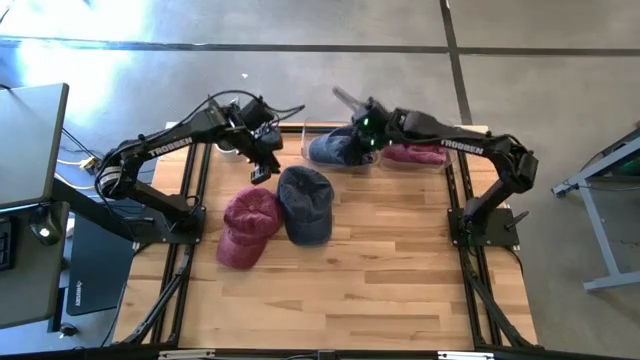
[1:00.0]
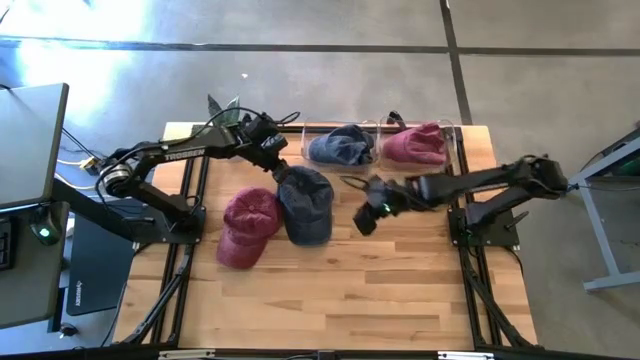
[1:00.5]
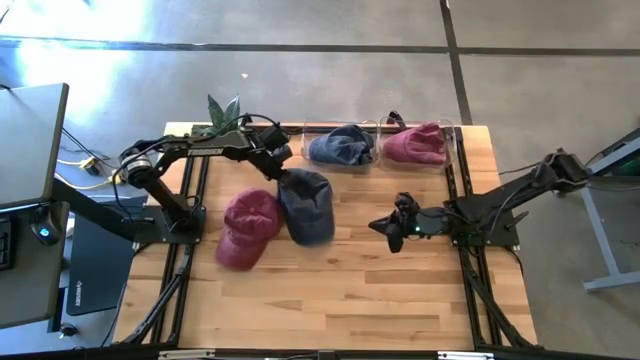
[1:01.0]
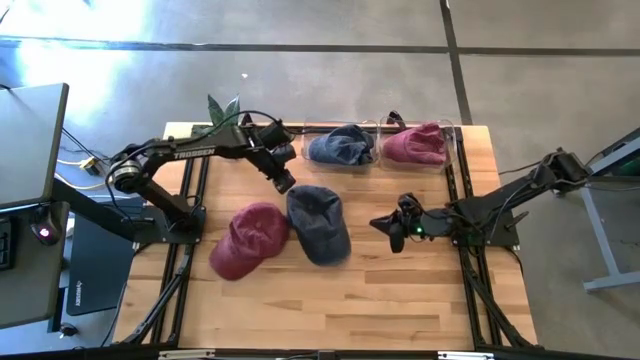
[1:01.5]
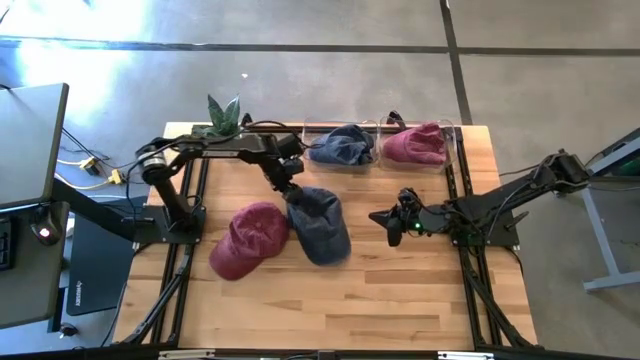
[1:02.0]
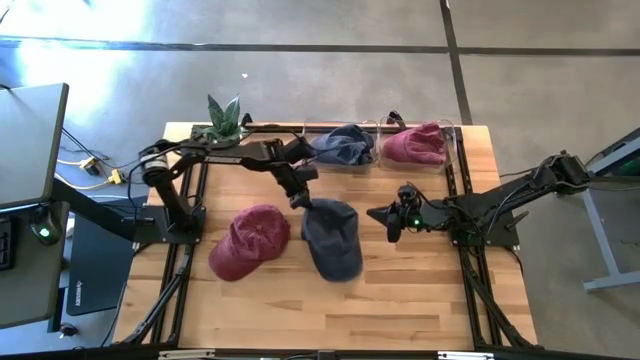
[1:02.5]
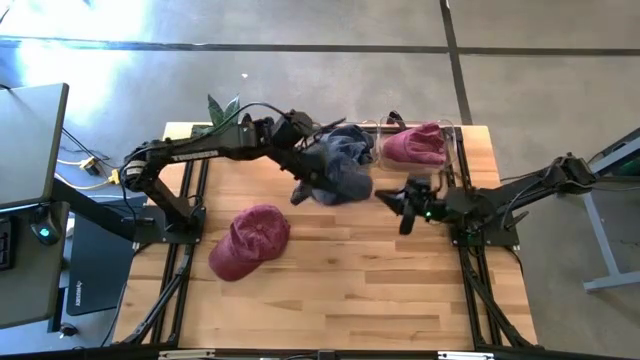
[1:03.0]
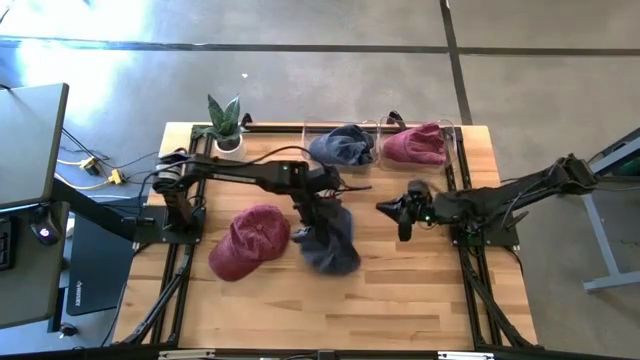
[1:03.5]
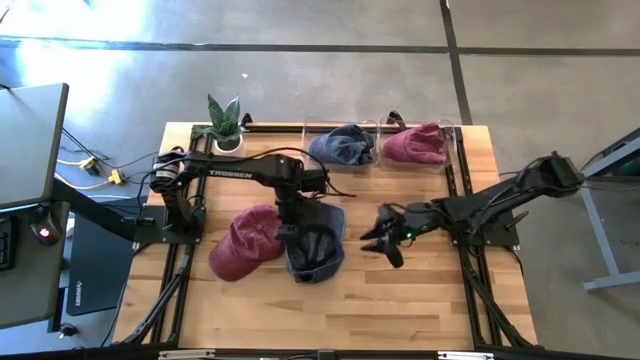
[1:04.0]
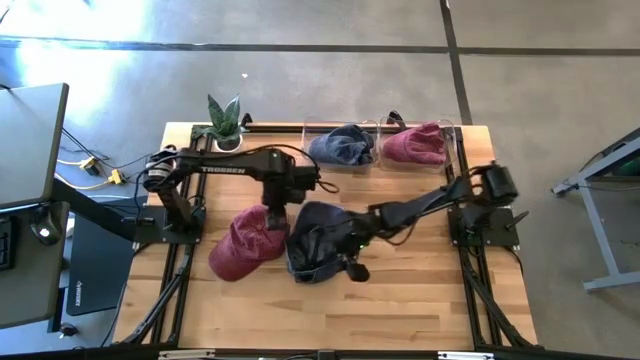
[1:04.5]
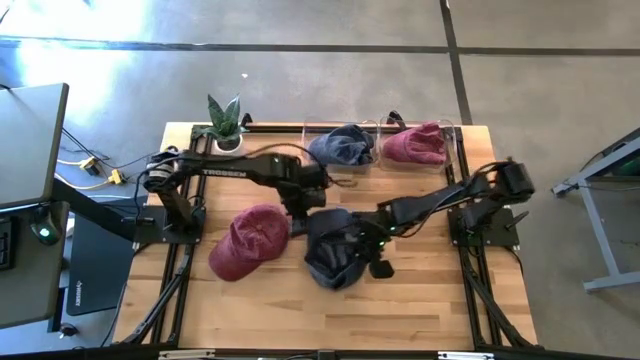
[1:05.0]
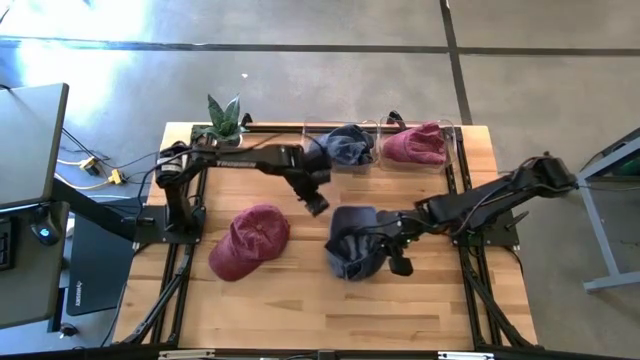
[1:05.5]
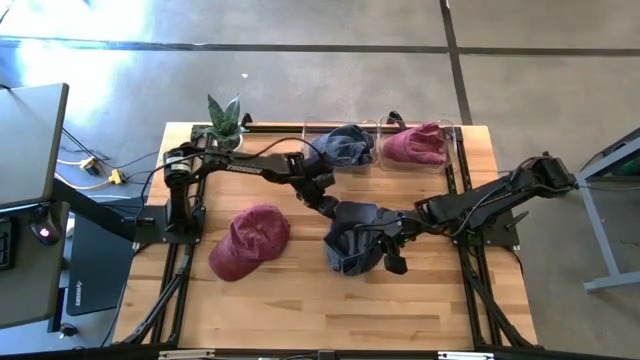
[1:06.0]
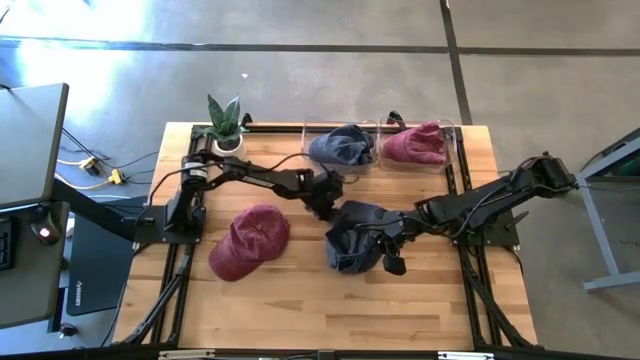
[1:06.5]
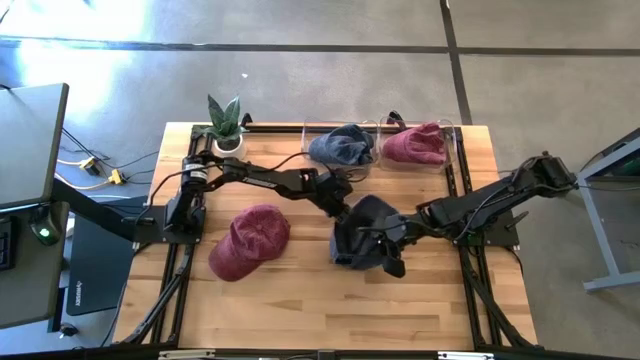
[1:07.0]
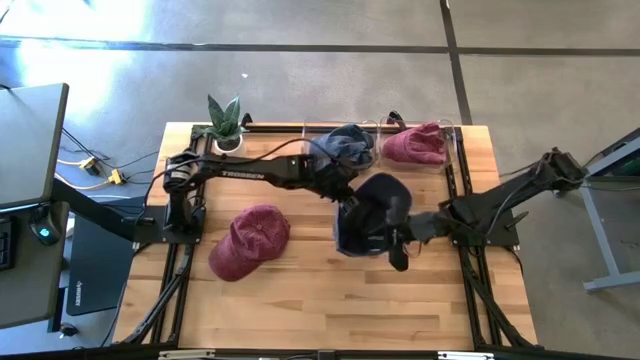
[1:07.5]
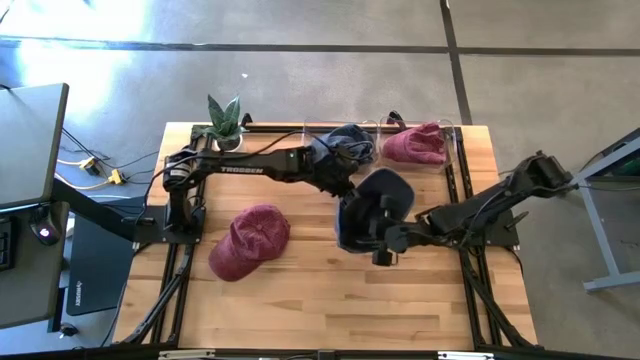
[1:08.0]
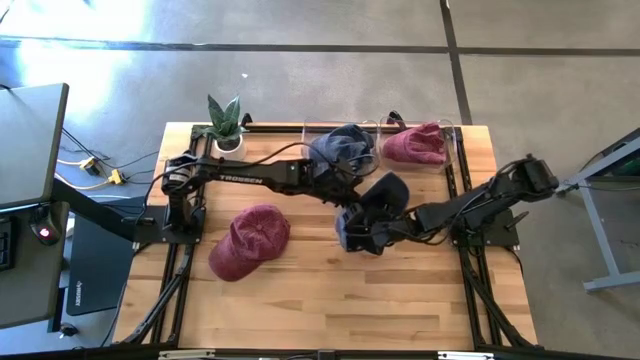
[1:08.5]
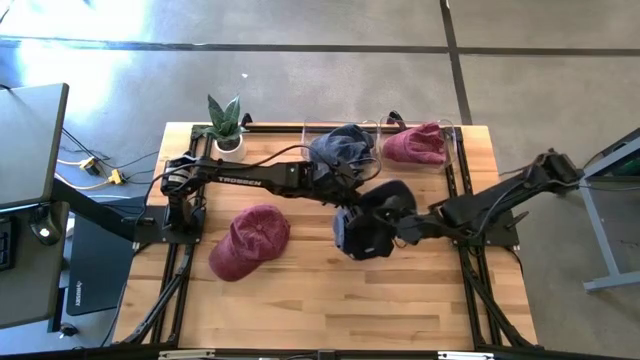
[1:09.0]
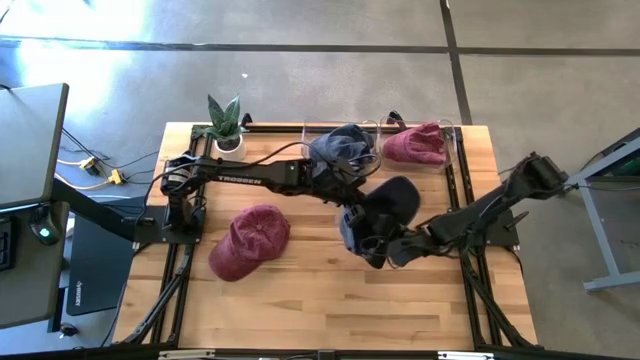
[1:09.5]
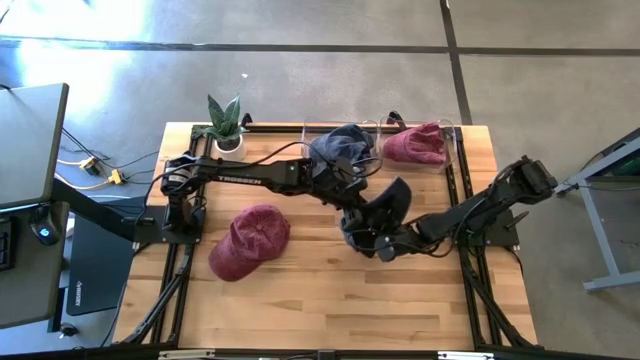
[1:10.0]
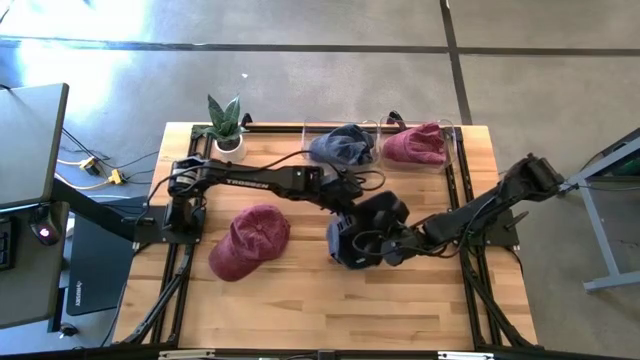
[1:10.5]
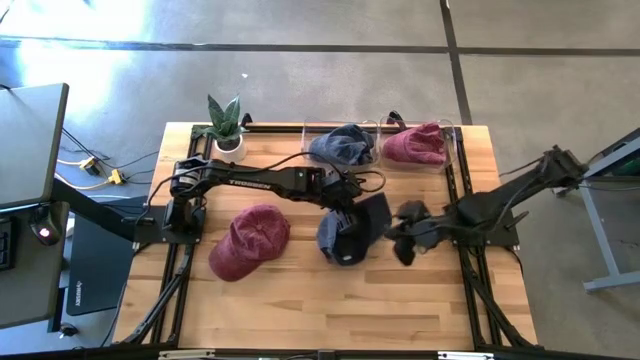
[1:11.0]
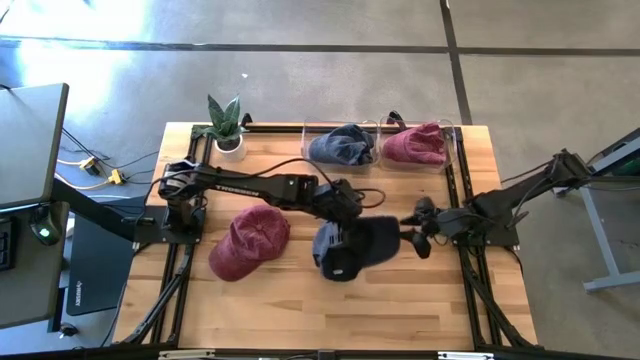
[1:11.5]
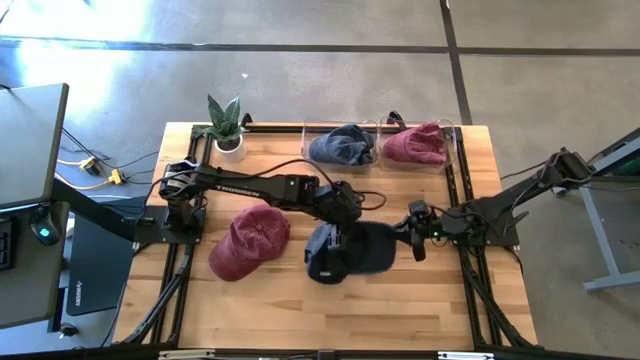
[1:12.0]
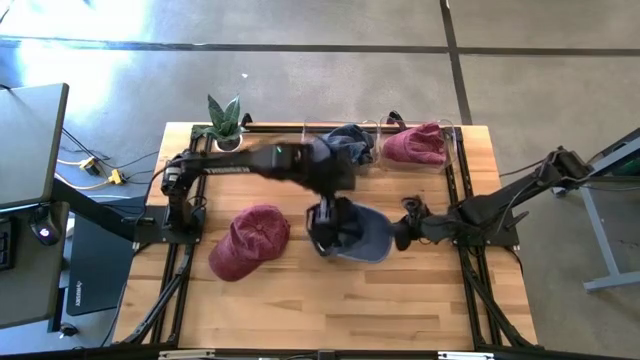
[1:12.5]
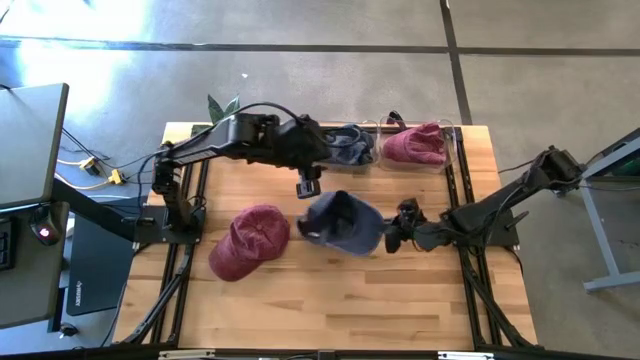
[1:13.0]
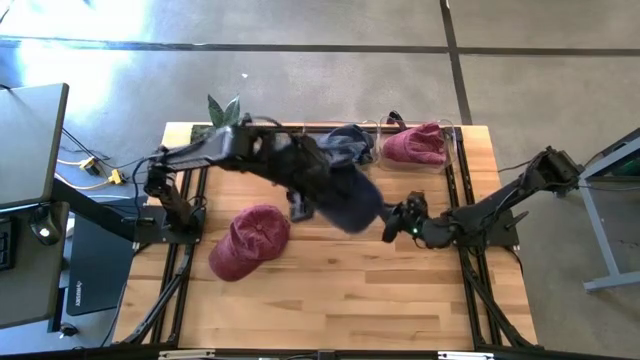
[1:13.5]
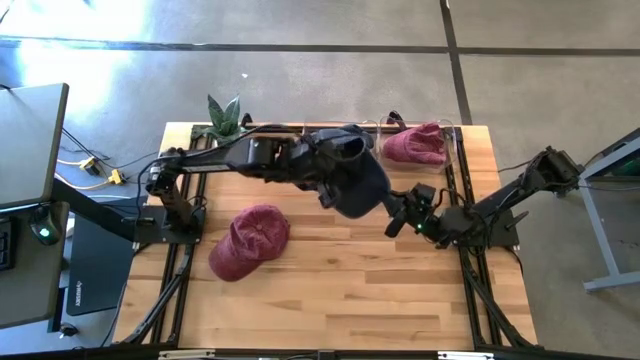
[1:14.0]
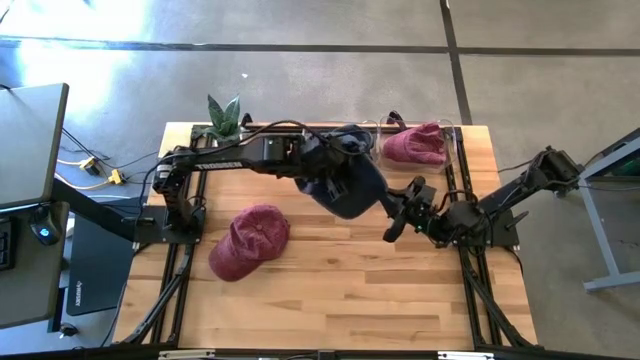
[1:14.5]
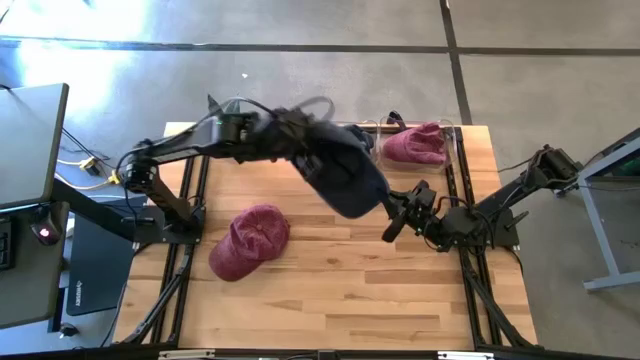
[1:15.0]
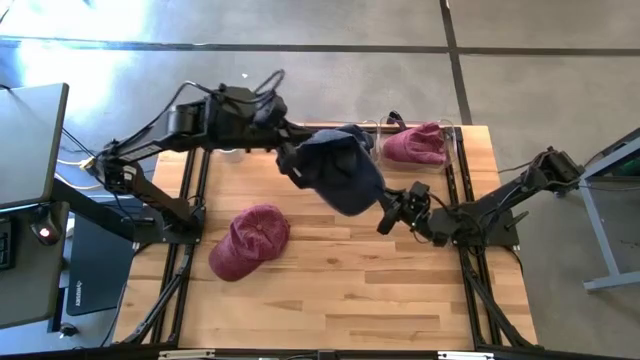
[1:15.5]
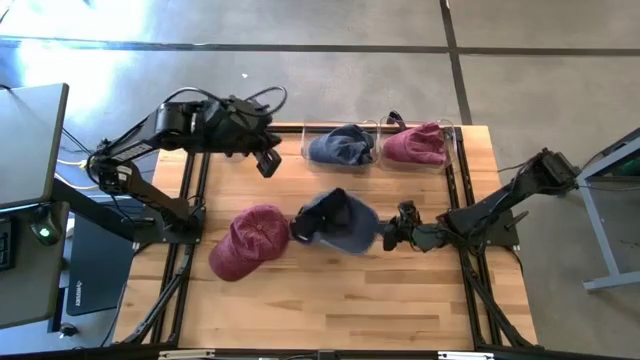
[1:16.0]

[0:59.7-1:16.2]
Task: Pick & Place hat
Put the dark blue cap into the left transparent bin

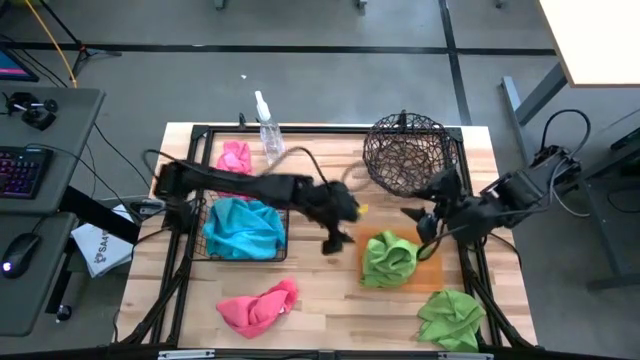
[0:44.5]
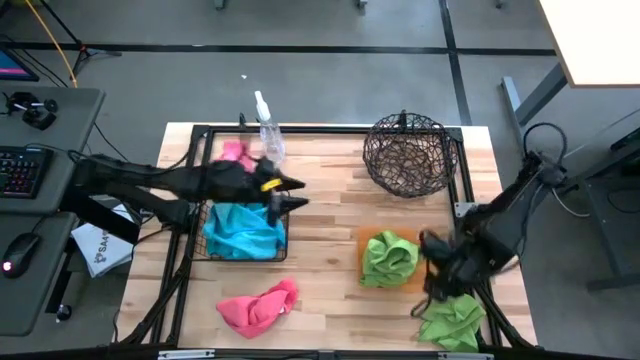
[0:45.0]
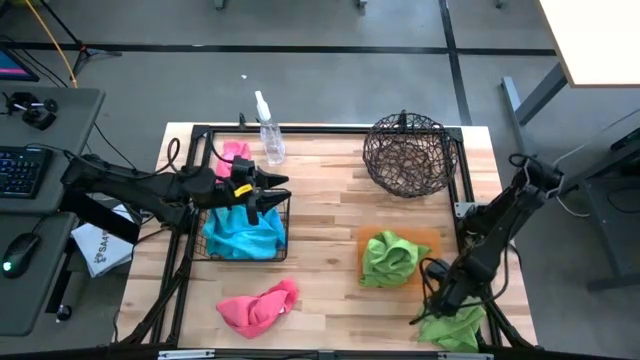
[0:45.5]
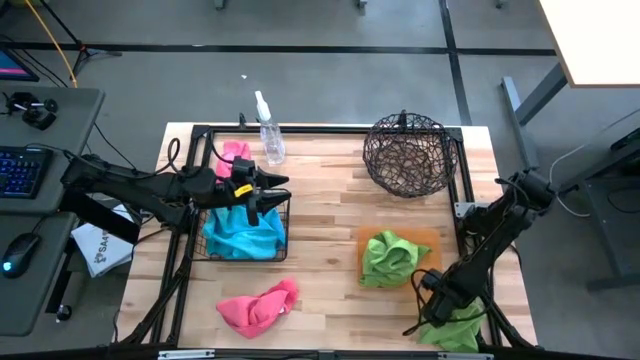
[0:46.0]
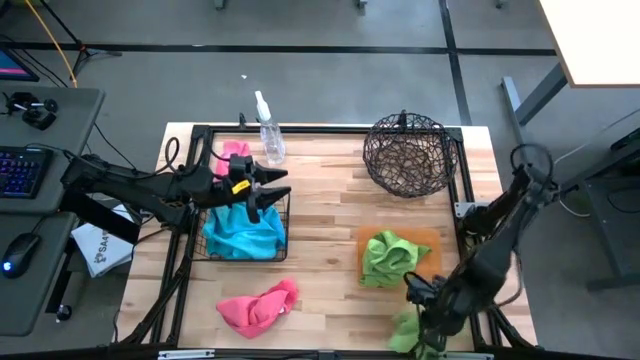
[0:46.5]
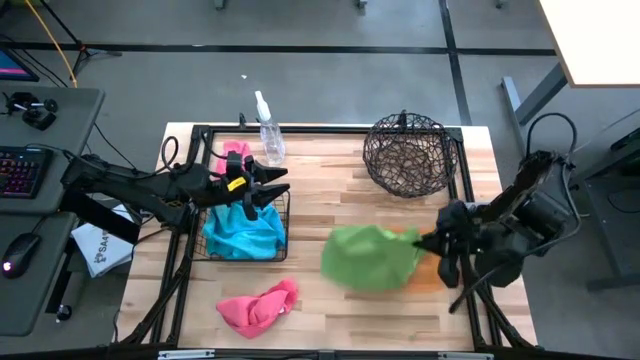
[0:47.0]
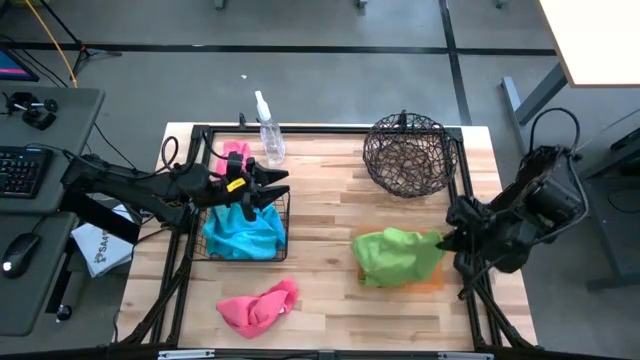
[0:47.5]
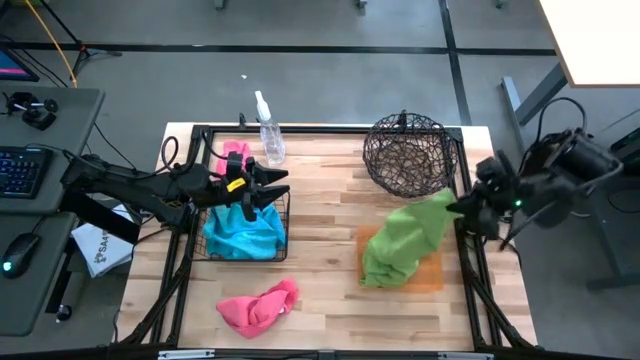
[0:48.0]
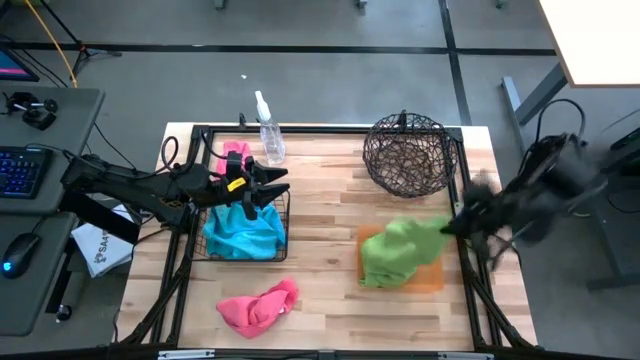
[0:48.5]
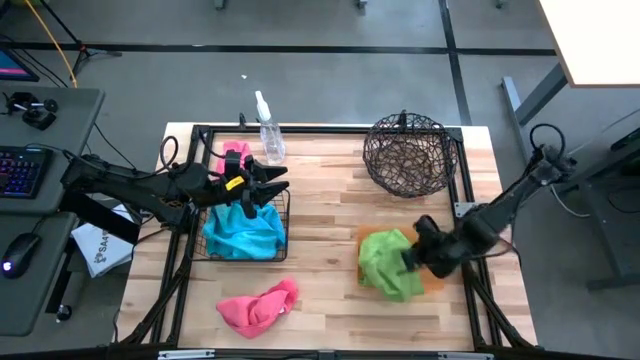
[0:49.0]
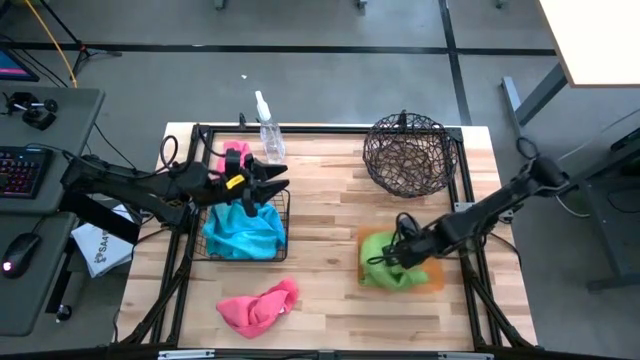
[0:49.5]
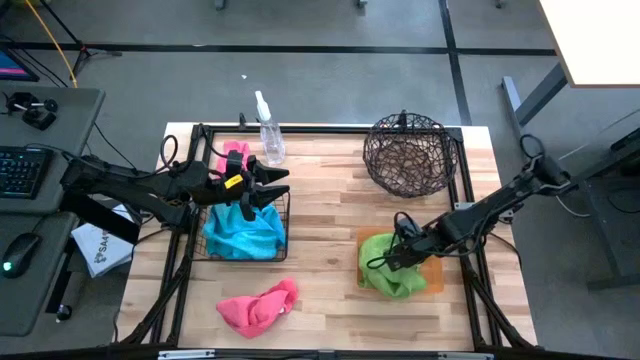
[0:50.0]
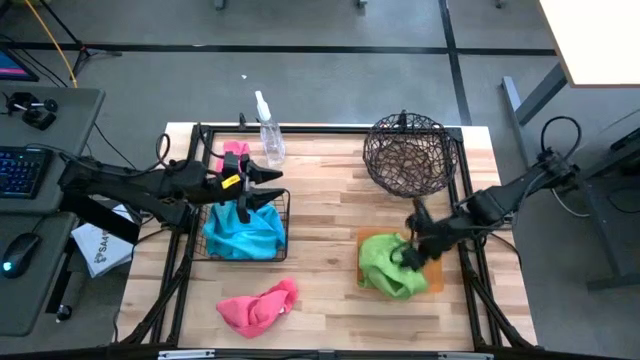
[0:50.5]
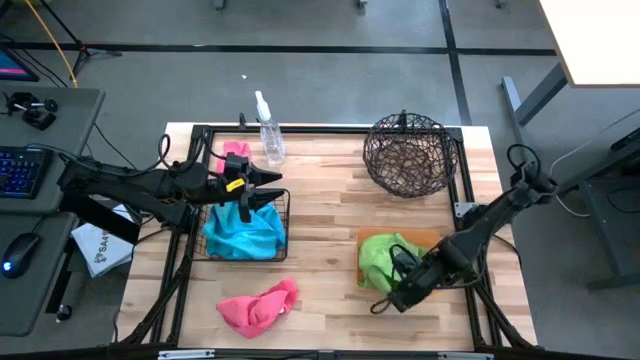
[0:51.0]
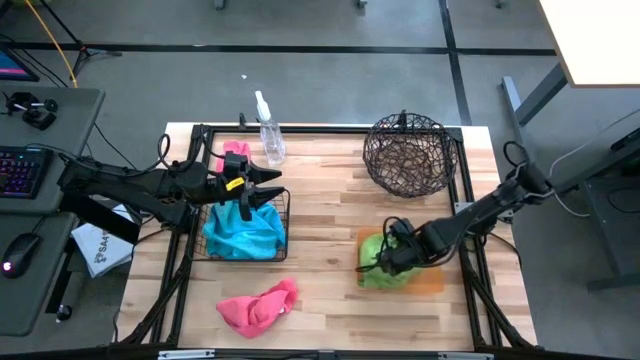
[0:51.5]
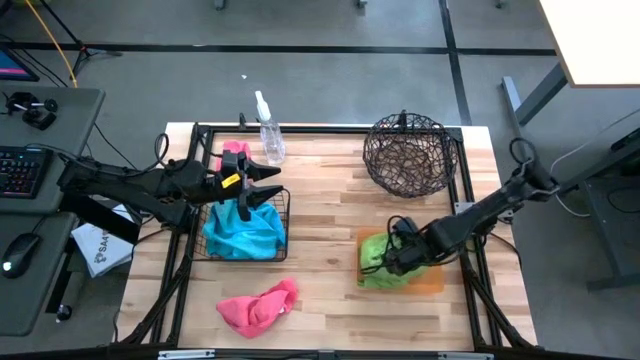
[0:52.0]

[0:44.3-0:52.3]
Task: Sort microfiber towel by color & place in baskets
Put the green microfiber towel into the orange bin
